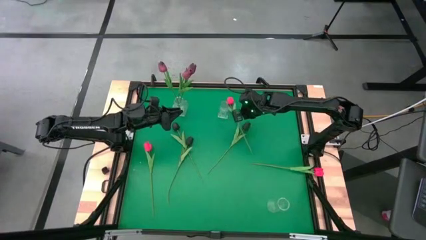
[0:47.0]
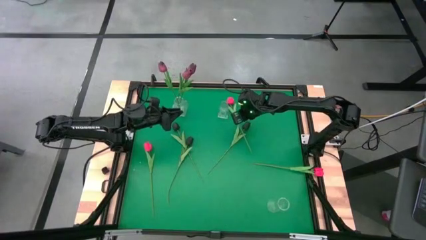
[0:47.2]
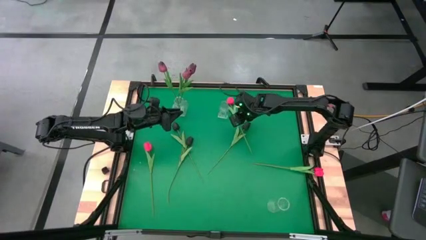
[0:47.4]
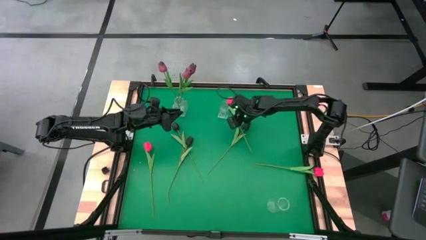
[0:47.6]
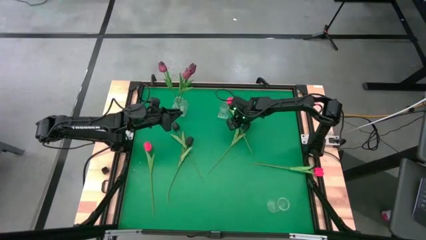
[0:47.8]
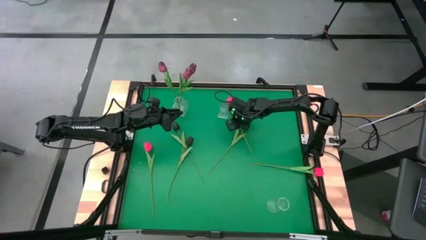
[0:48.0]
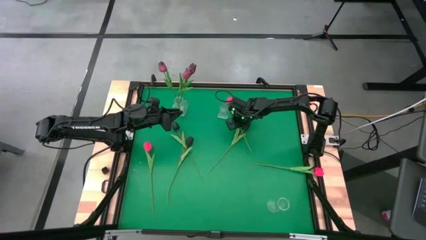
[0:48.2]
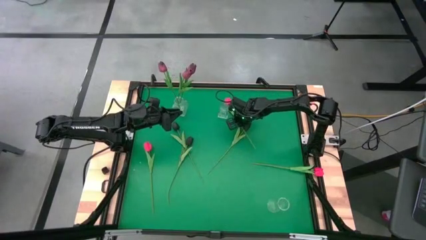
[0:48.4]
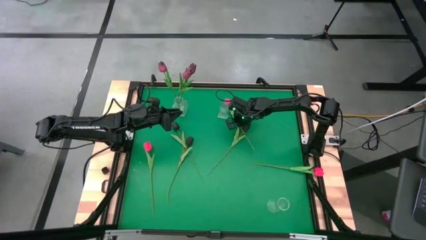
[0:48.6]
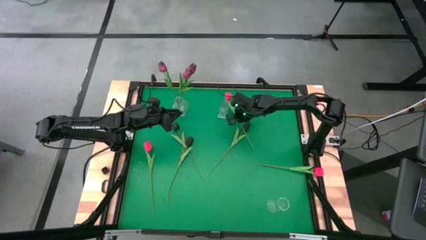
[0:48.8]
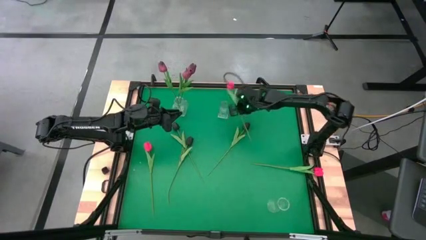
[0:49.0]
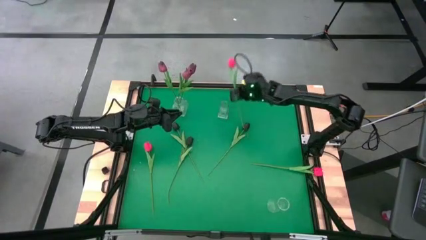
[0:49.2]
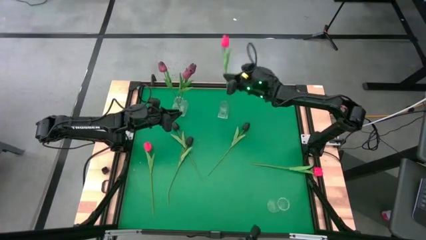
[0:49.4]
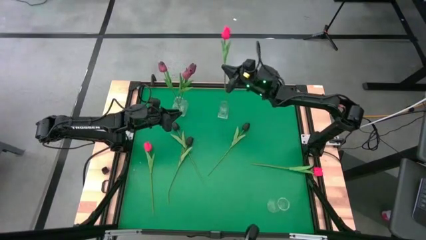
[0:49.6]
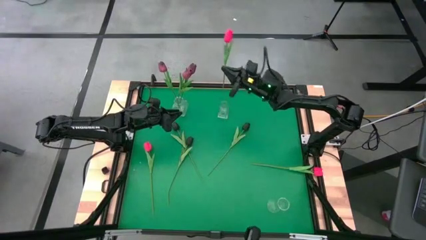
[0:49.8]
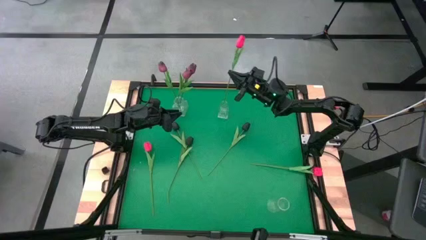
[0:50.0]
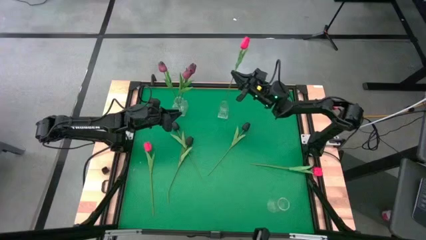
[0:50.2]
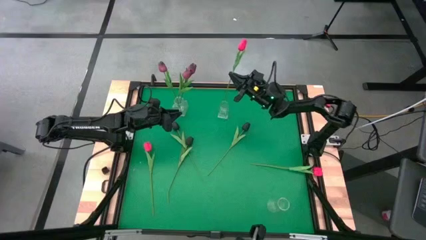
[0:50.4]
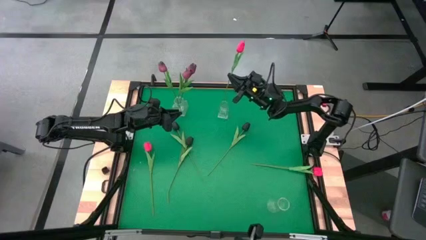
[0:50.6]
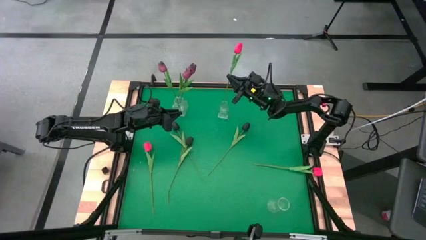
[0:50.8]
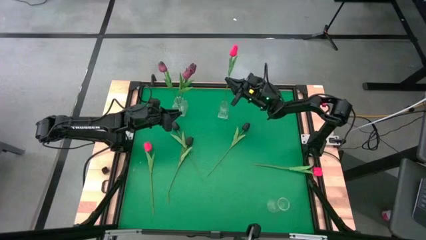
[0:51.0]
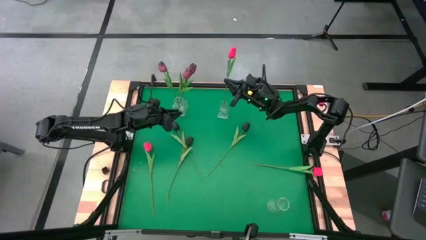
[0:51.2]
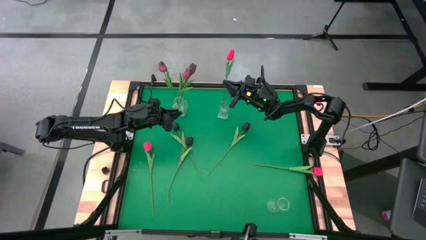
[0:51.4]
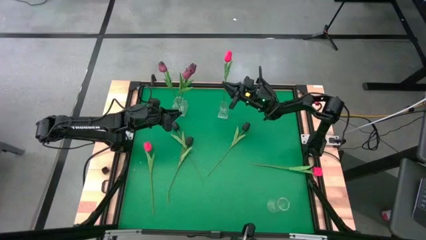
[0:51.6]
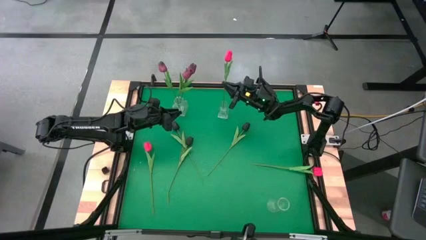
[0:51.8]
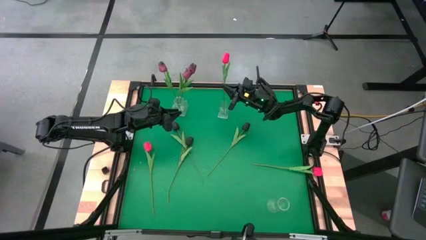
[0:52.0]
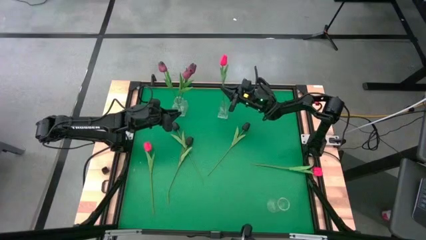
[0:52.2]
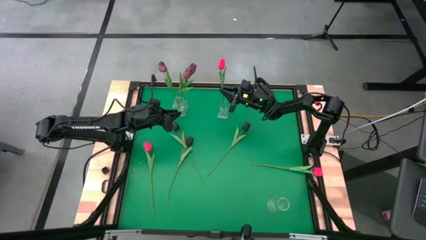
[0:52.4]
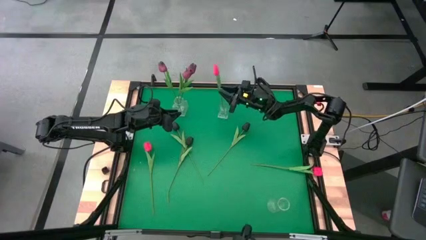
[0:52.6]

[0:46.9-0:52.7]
Task: Sort flowers into vase by color
Put the middle pink tulip into the top right transparent vase

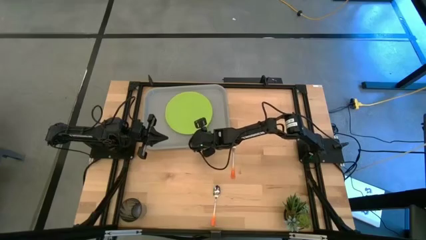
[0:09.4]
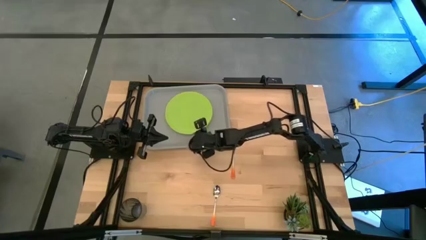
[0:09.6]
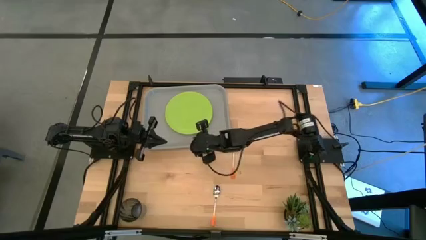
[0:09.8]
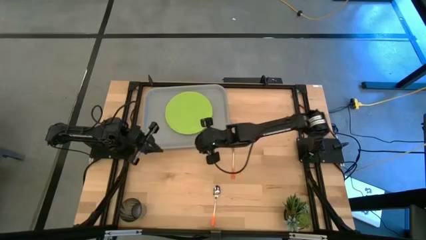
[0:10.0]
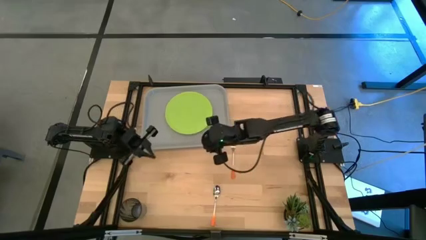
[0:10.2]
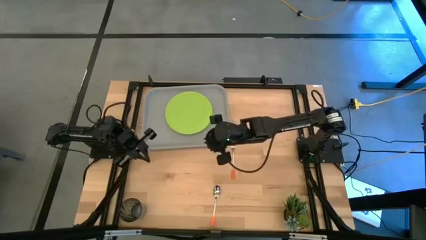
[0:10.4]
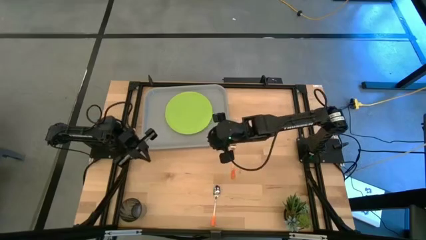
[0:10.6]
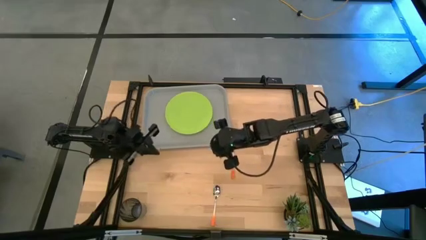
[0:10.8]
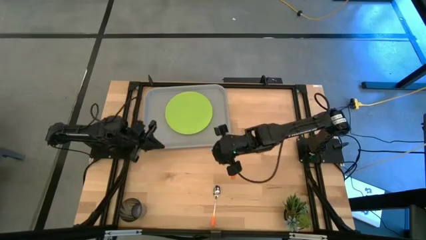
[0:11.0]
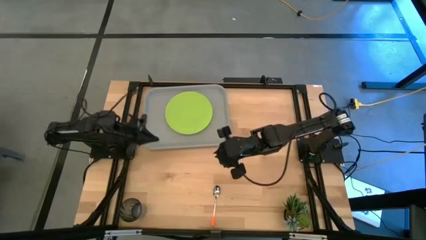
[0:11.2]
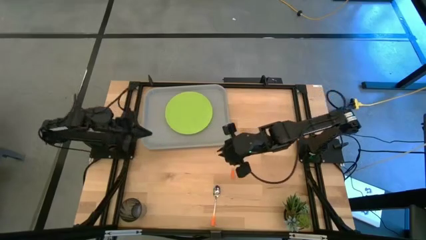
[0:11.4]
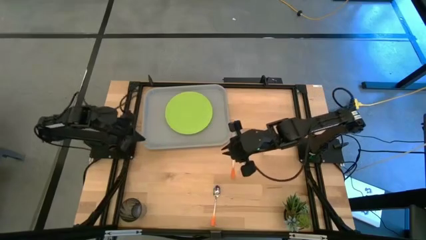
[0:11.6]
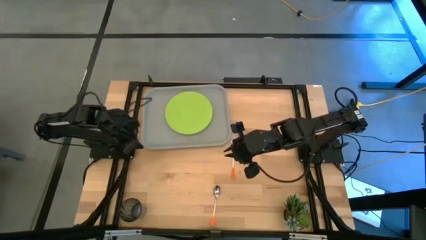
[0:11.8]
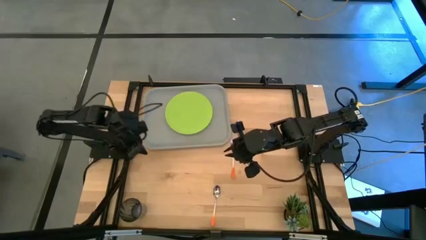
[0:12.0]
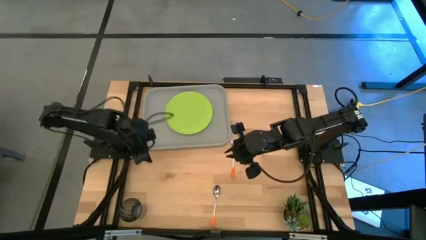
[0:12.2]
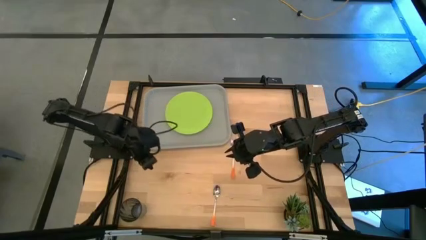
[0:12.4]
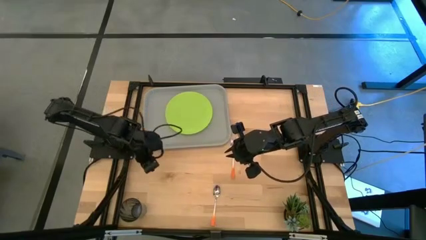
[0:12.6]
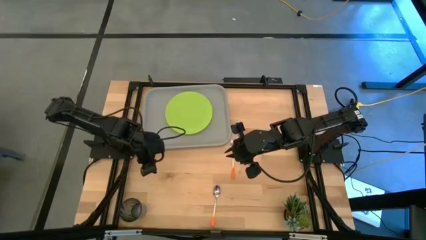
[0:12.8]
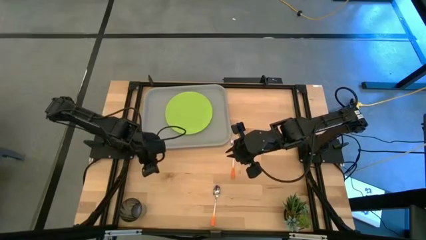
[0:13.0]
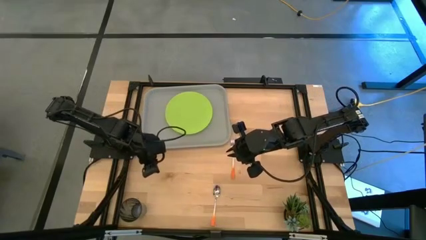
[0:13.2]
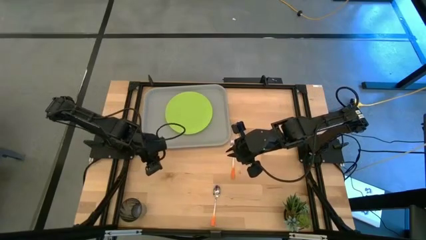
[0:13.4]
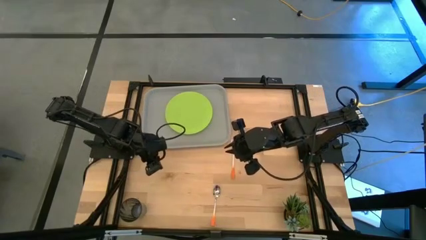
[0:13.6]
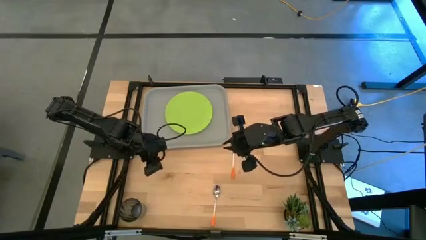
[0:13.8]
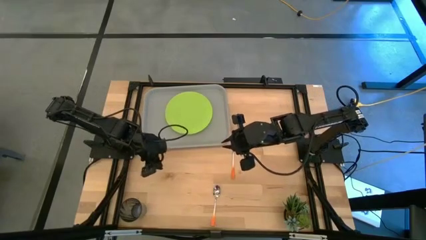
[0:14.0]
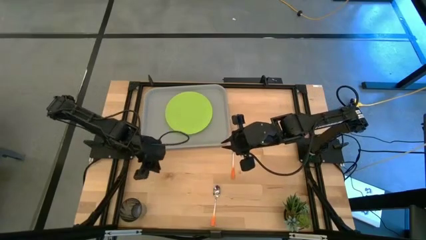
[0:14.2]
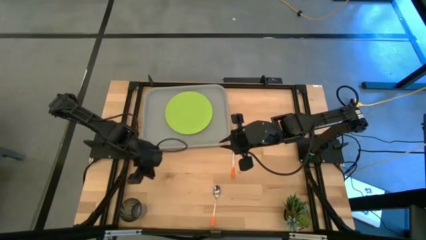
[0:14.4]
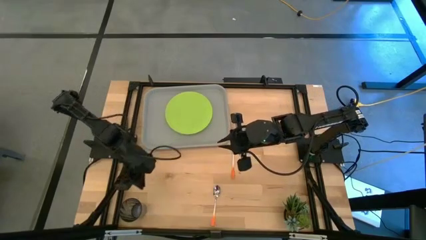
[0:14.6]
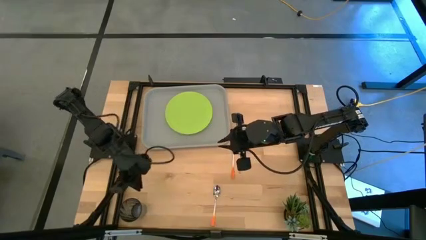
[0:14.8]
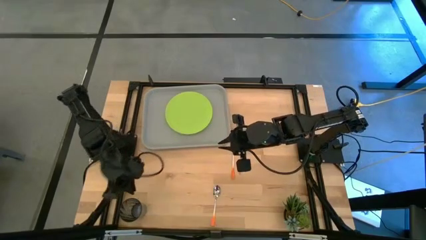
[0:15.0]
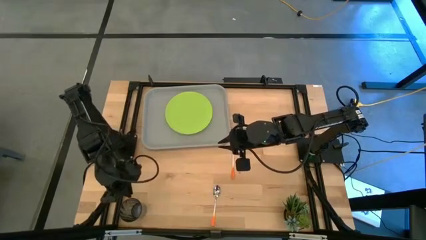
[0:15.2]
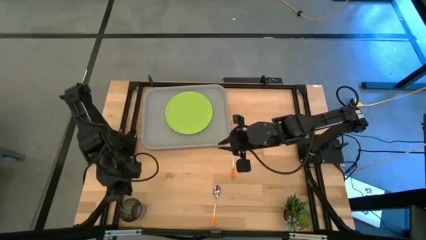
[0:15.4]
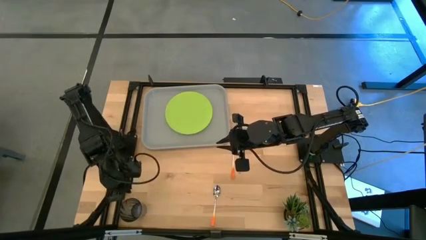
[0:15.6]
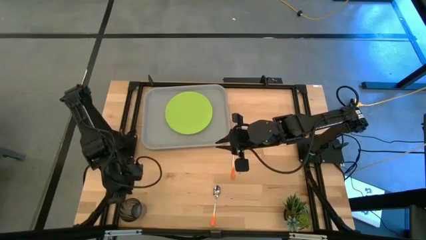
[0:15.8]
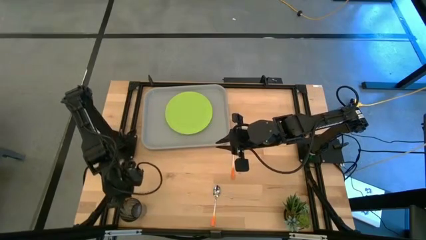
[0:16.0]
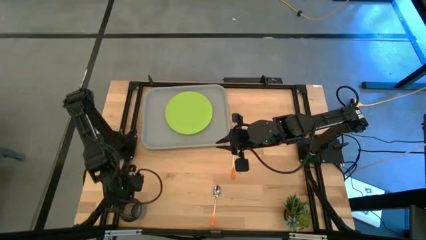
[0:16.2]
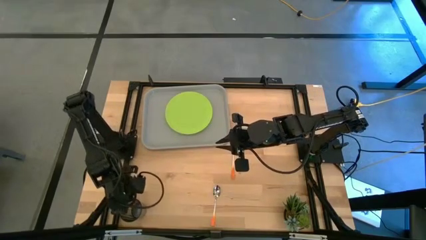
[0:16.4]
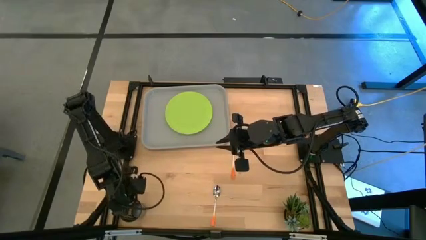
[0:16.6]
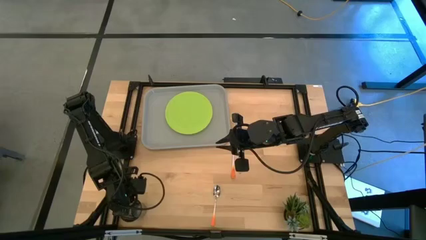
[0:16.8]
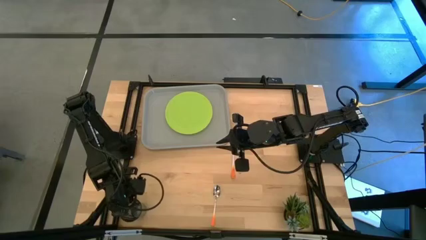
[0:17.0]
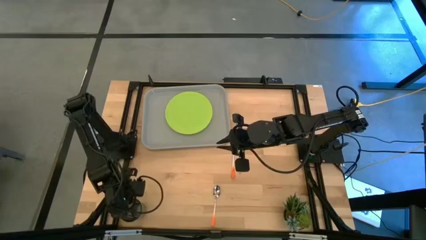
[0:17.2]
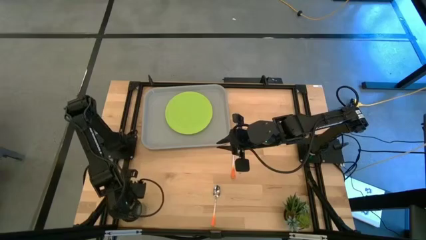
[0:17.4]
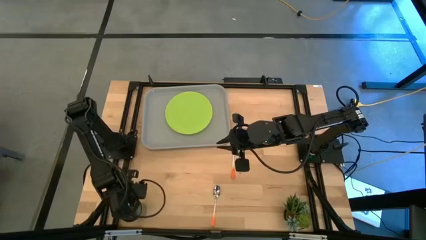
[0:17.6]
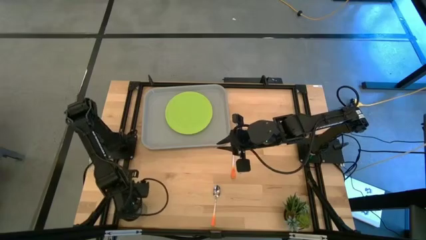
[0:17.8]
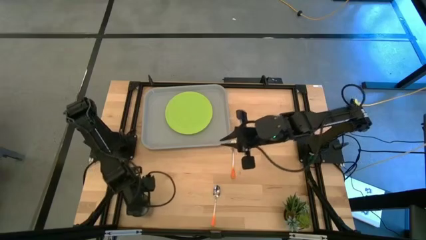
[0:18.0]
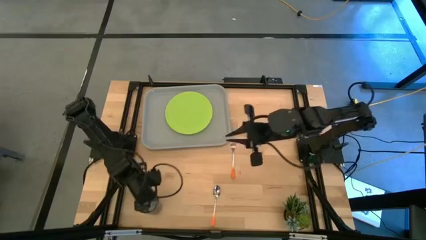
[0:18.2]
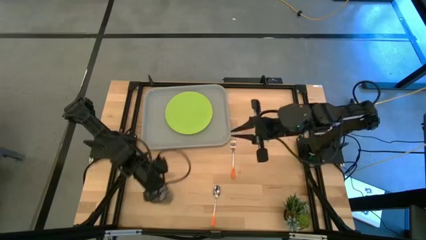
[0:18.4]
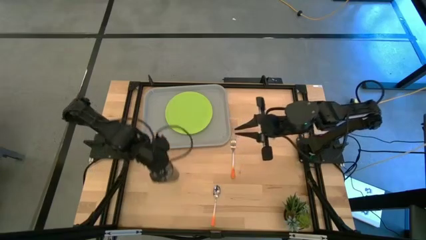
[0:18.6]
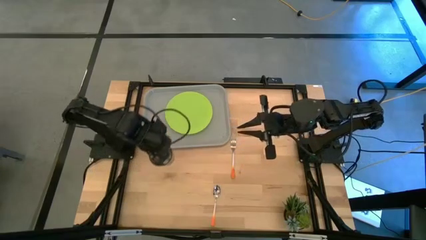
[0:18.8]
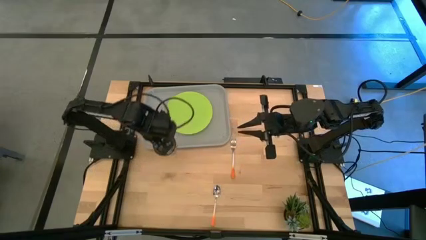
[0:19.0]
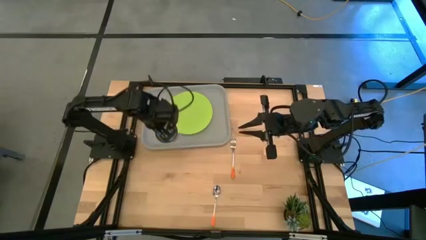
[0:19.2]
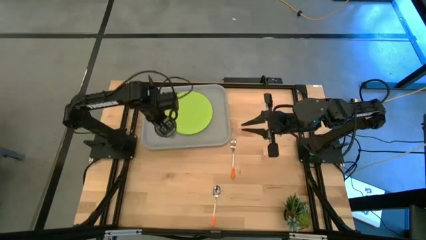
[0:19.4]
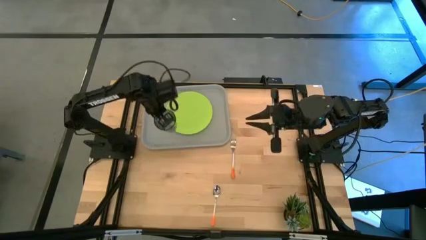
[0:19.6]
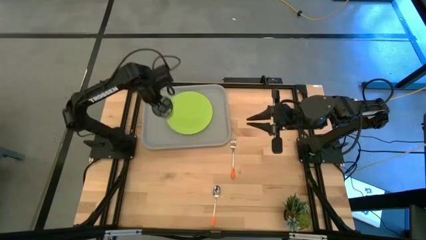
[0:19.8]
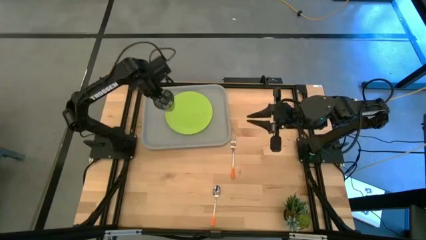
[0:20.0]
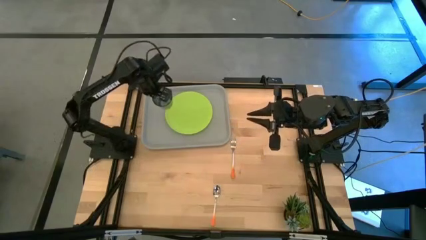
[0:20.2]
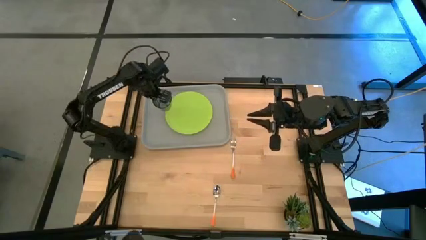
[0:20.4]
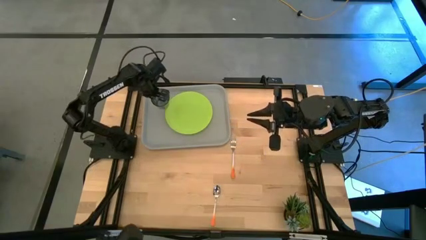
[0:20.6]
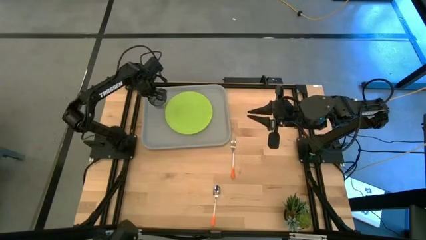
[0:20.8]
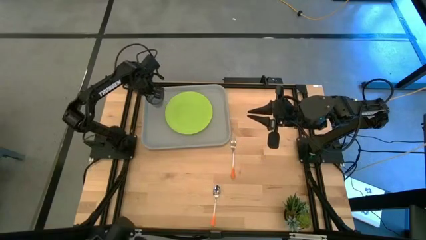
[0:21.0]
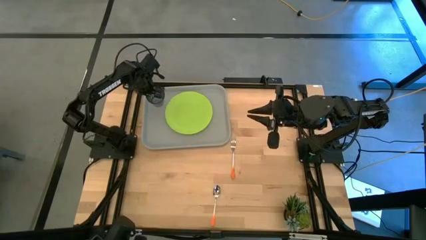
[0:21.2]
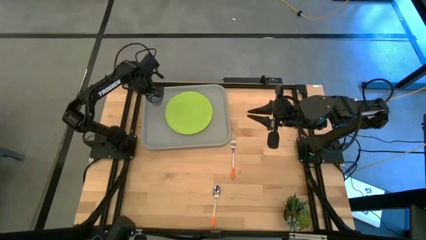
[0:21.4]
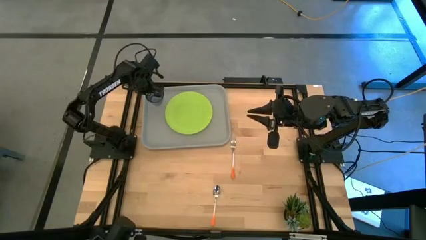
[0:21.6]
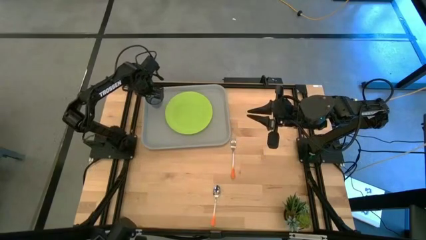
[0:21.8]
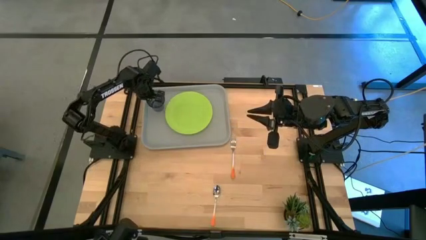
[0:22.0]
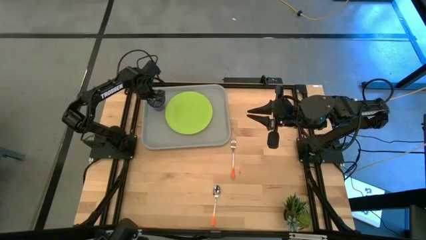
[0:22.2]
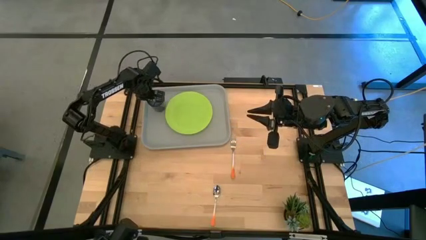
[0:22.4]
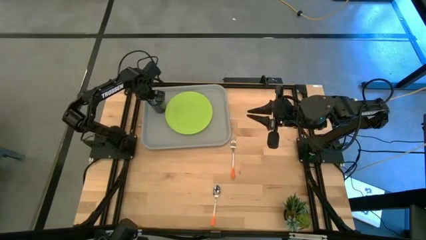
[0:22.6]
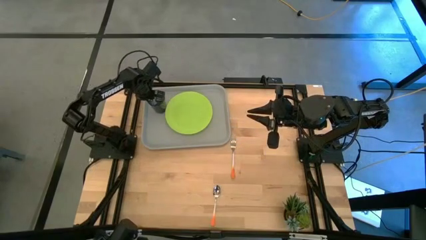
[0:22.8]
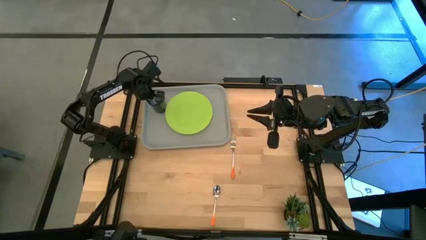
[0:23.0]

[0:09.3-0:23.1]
Task: Pick and place plate/cup/fork/spoon on tray
Put the blue cup on the gray tray to the top left of the green plate
